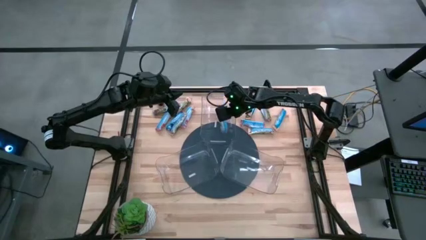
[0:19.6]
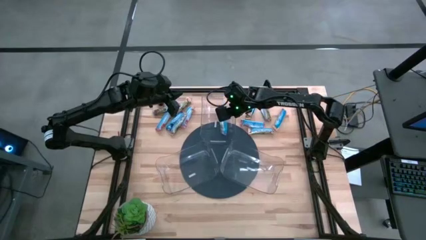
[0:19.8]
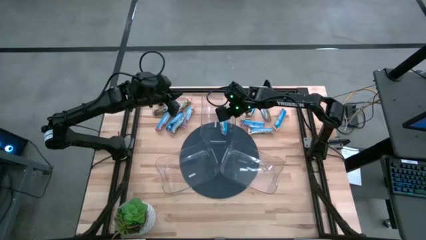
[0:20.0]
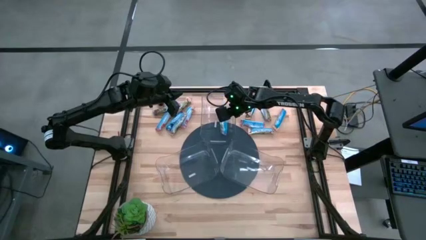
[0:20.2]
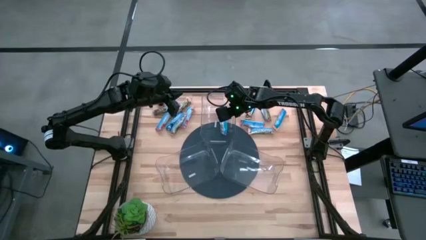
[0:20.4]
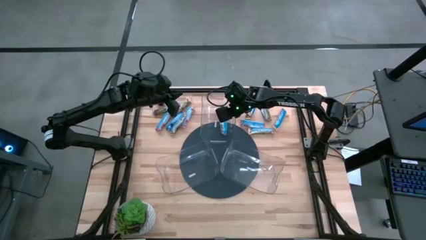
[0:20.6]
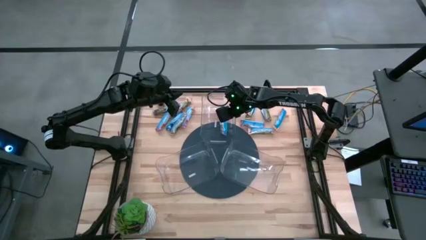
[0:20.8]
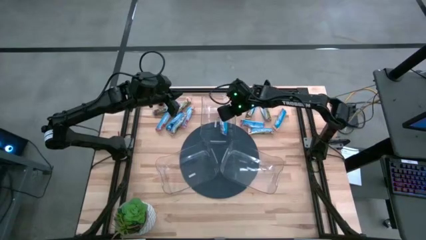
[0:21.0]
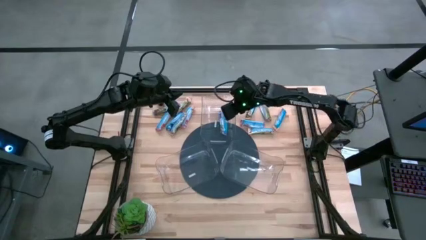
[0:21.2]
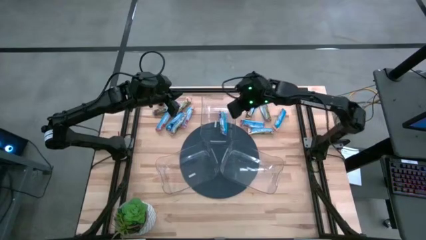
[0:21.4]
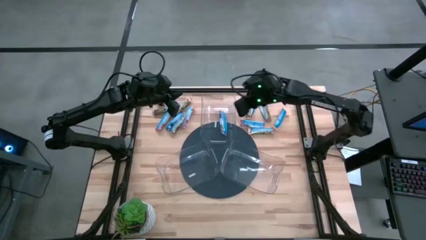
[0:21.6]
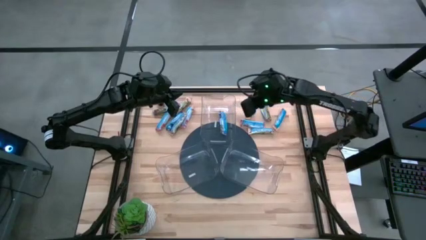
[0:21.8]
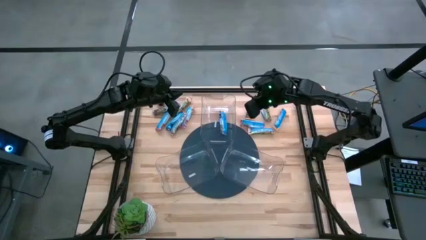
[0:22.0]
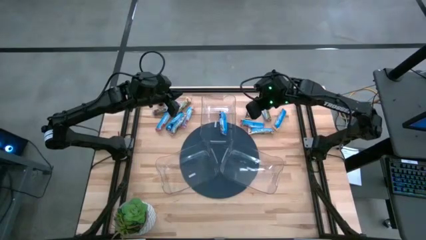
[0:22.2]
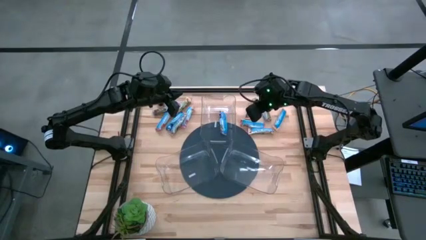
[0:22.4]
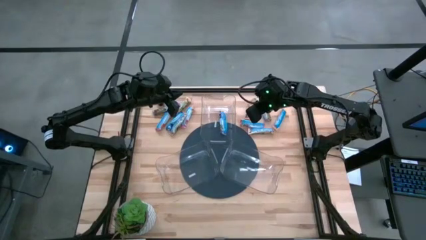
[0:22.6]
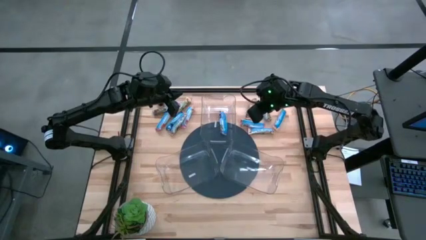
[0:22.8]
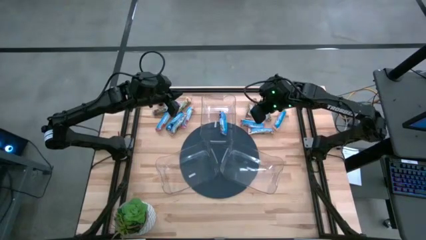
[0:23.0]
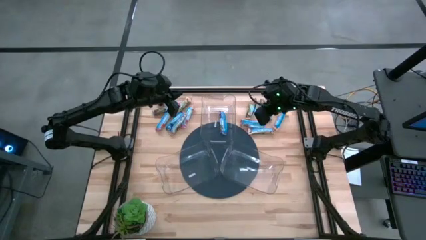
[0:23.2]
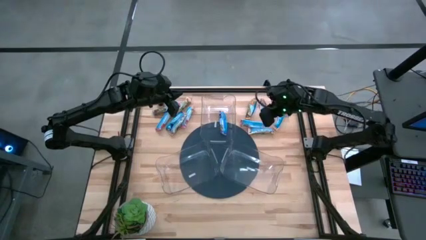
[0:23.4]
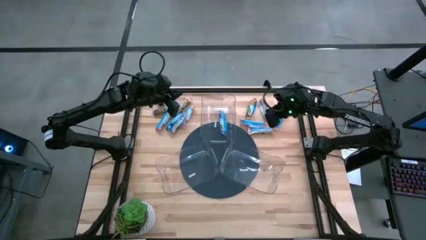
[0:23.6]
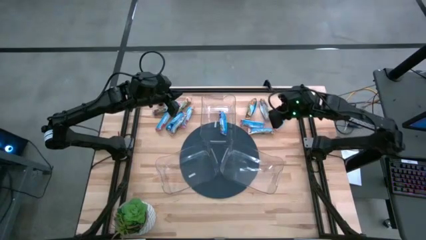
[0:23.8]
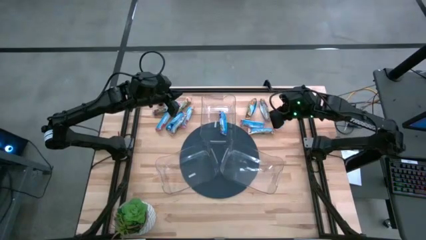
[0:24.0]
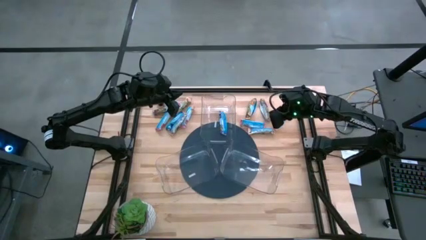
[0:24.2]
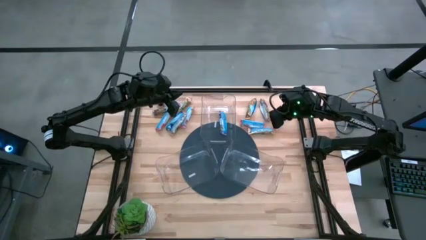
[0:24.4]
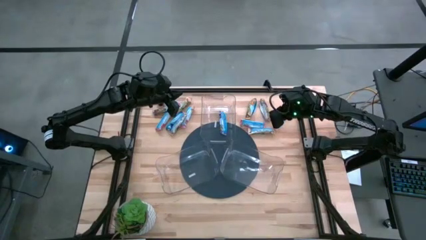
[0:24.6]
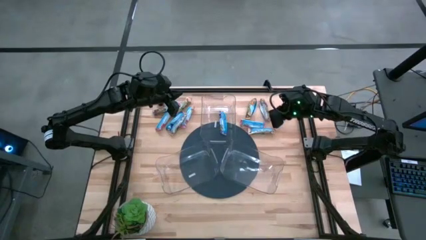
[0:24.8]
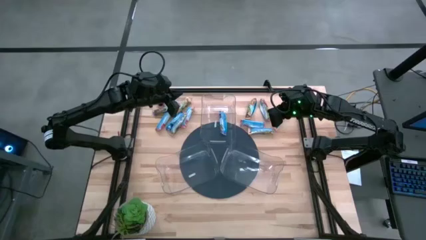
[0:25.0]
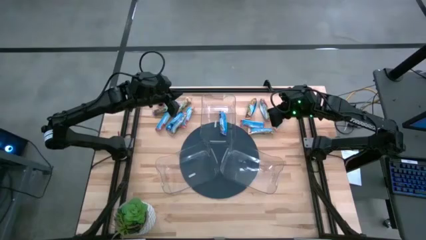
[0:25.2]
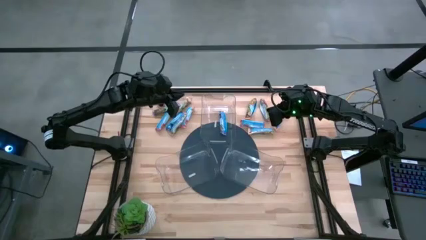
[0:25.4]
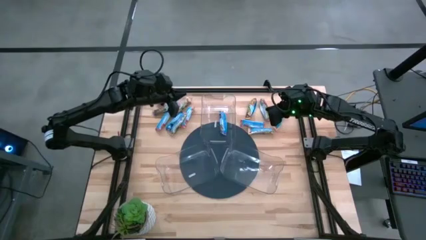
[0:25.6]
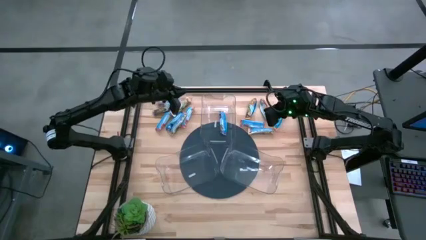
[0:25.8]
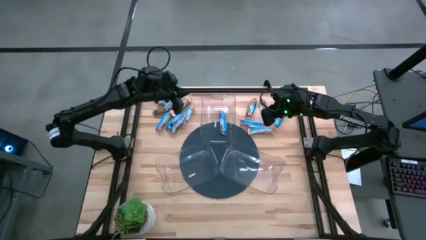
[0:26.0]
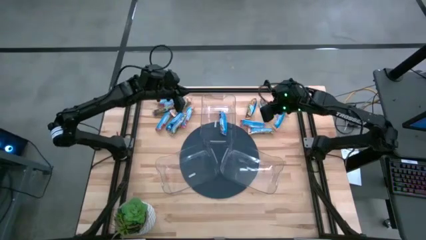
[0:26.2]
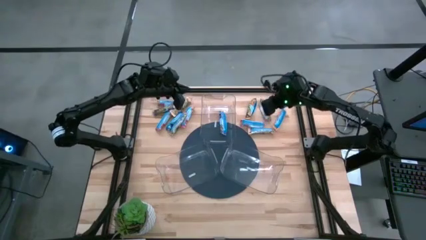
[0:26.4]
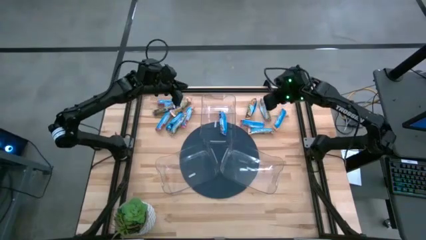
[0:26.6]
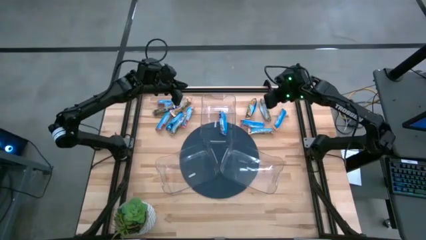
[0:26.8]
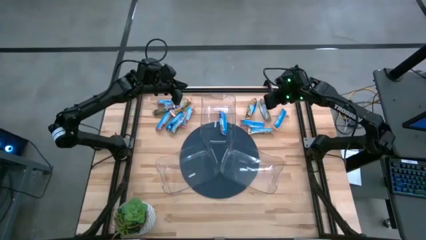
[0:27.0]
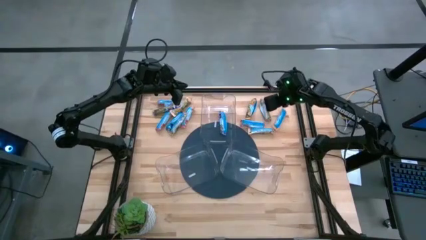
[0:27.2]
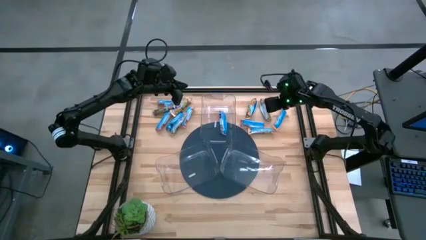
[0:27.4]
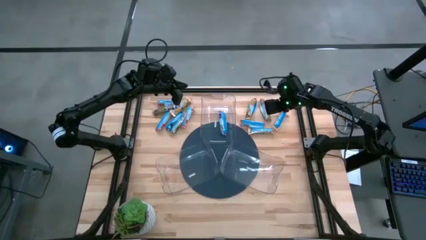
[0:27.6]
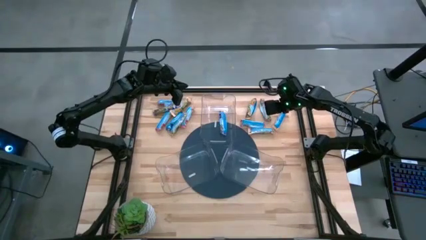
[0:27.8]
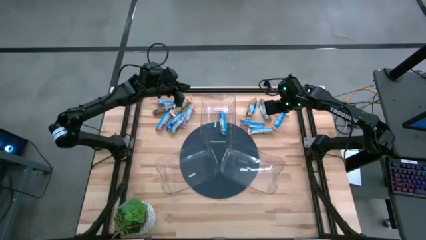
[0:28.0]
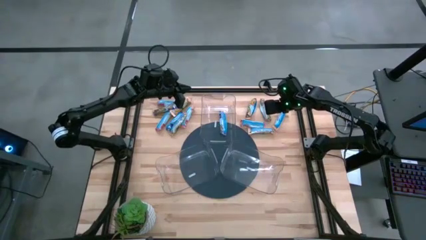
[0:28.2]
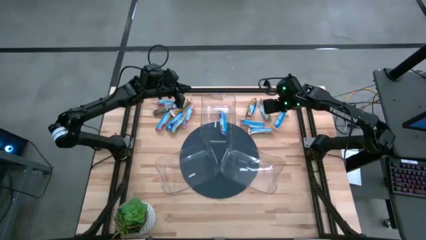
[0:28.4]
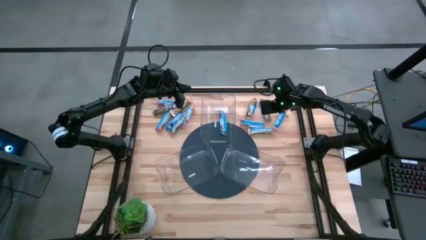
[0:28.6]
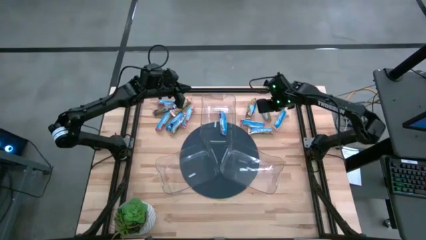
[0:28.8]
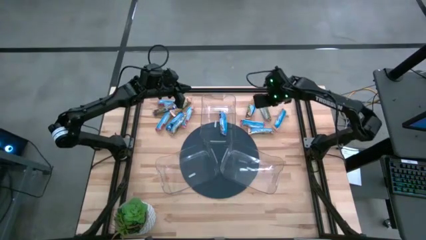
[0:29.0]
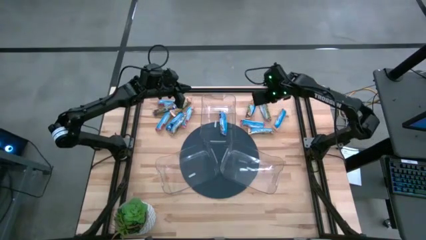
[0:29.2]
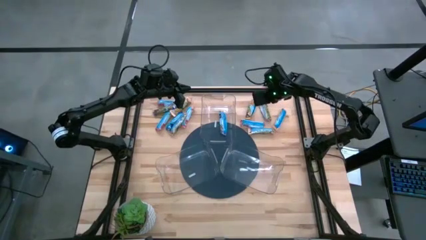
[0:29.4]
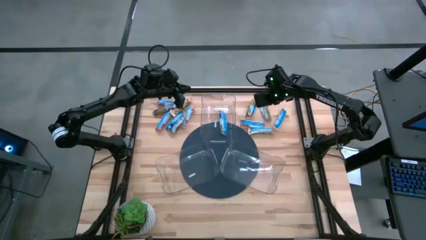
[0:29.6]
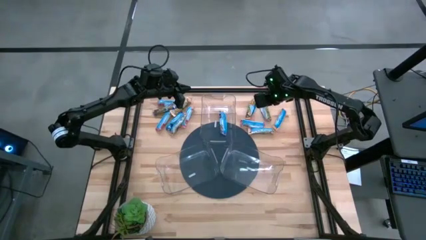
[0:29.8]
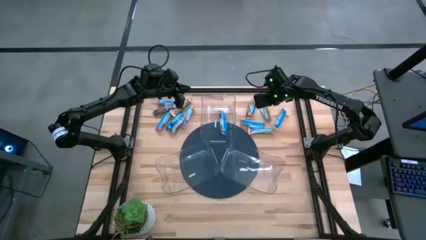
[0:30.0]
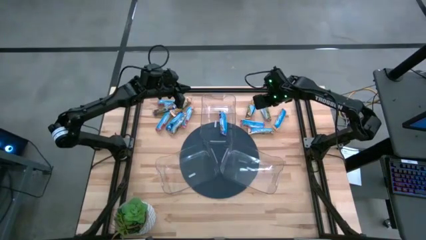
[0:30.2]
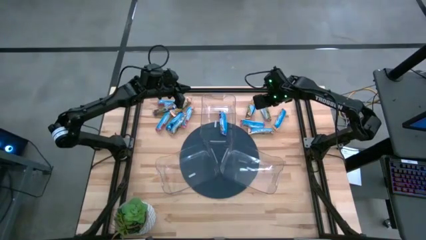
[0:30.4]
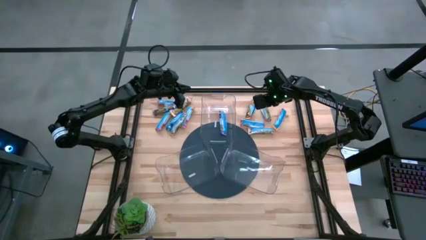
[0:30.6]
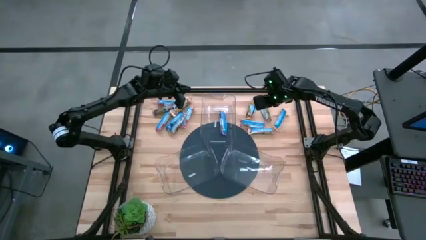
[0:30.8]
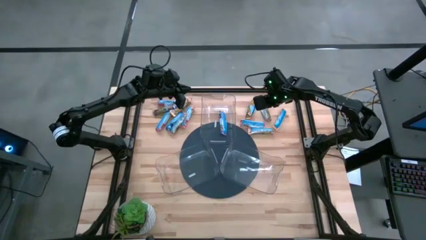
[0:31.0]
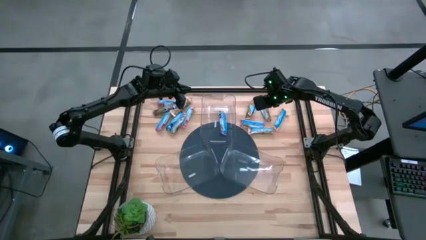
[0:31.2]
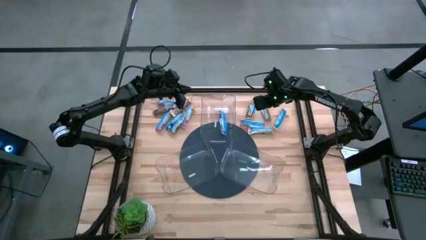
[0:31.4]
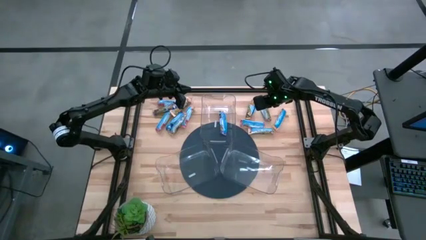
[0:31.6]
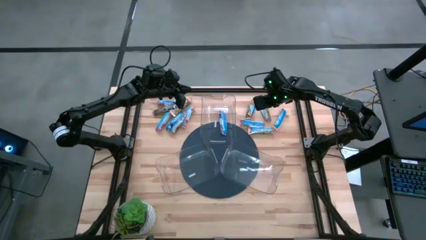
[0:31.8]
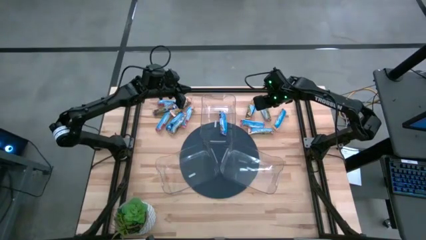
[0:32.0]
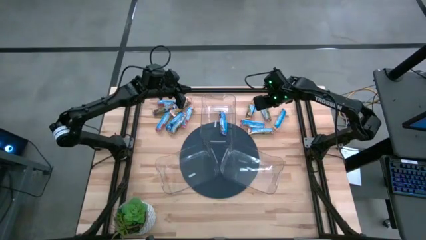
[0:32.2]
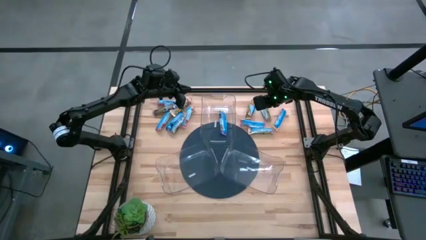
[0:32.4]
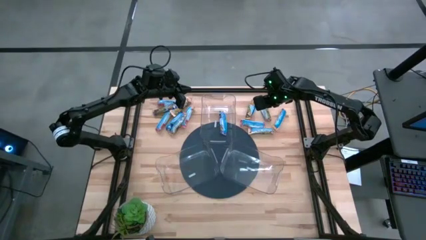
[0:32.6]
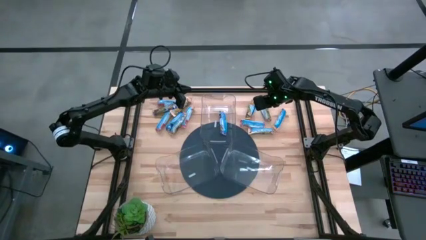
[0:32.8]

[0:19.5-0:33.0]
Task: Pick and place Granola Bars by type
Put the yellow granola bar into the right transparent bin

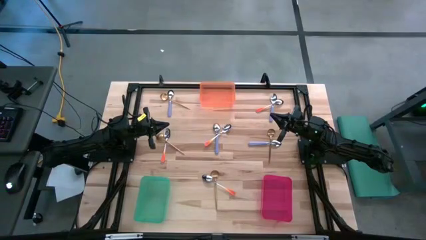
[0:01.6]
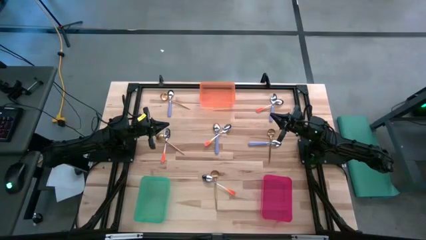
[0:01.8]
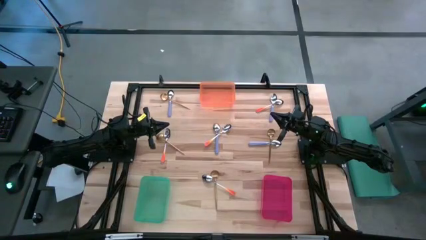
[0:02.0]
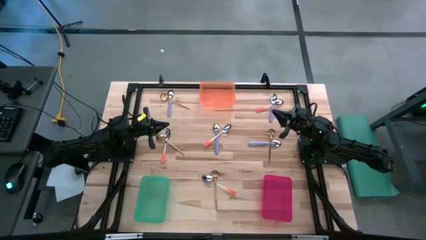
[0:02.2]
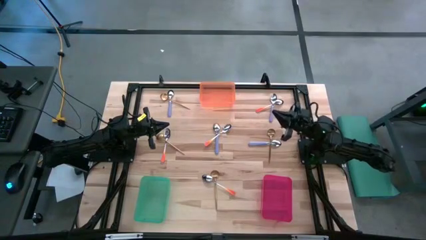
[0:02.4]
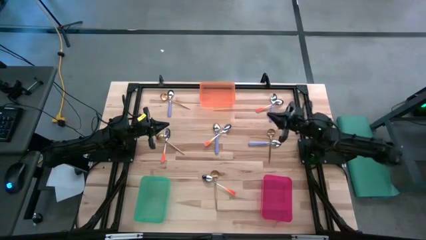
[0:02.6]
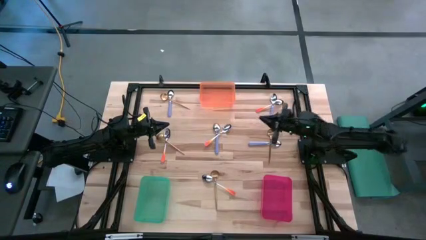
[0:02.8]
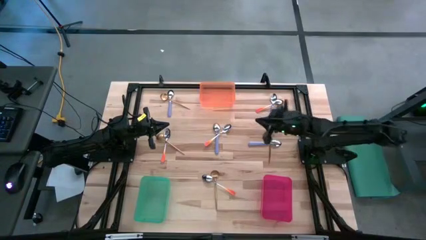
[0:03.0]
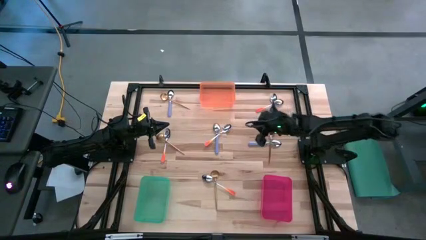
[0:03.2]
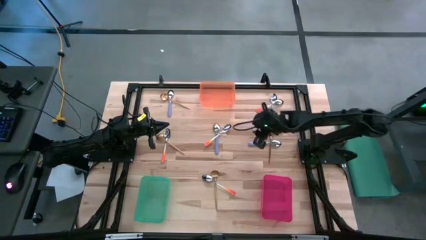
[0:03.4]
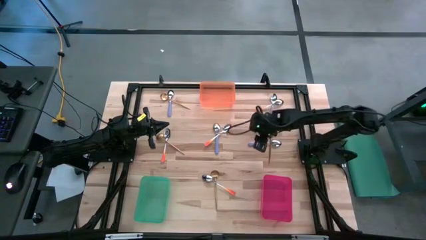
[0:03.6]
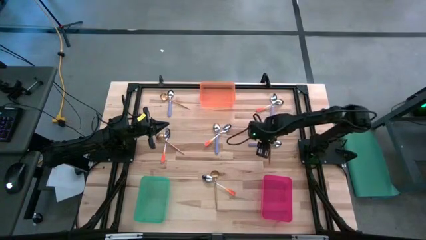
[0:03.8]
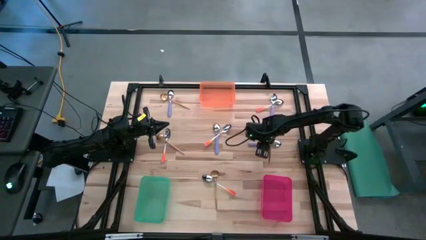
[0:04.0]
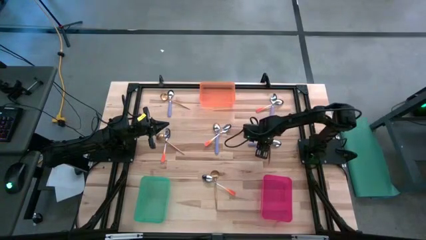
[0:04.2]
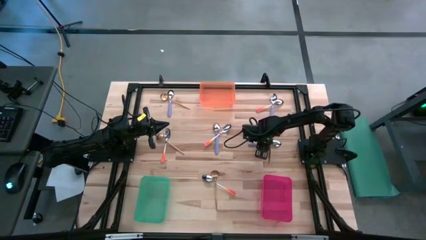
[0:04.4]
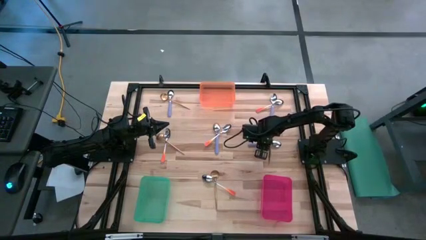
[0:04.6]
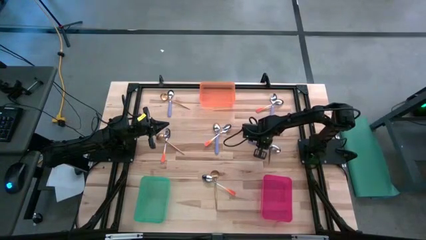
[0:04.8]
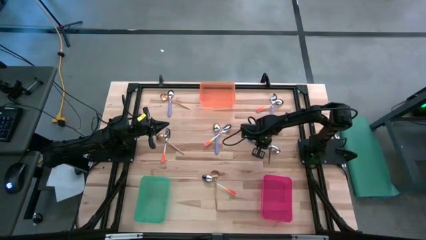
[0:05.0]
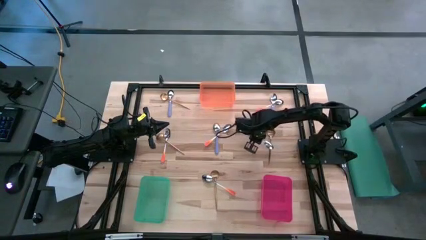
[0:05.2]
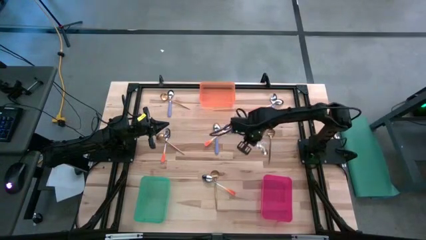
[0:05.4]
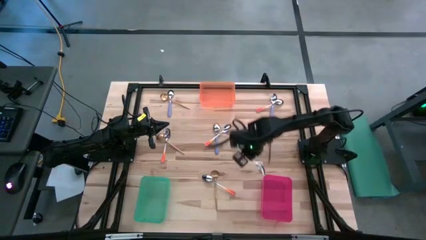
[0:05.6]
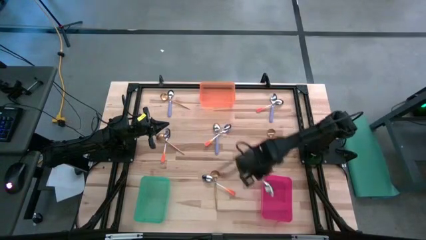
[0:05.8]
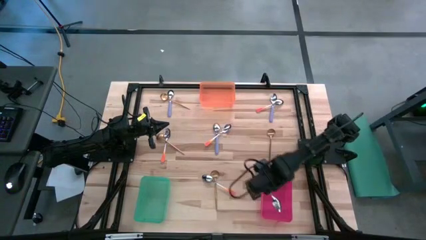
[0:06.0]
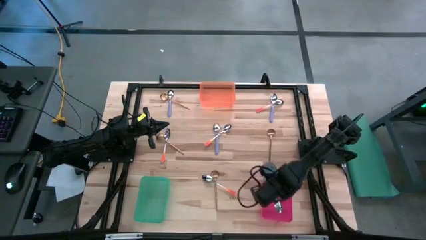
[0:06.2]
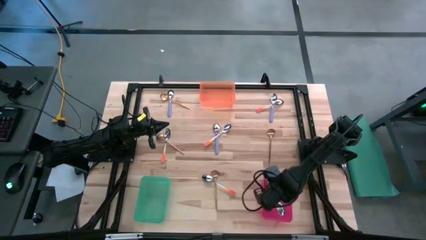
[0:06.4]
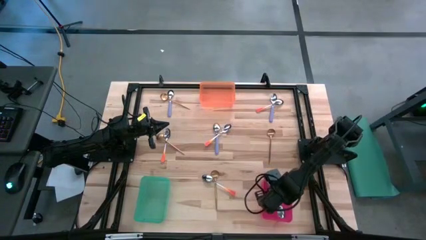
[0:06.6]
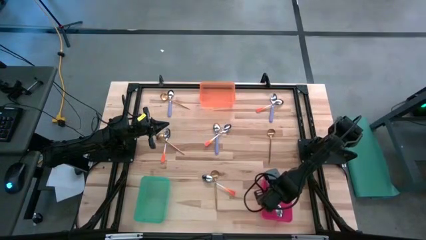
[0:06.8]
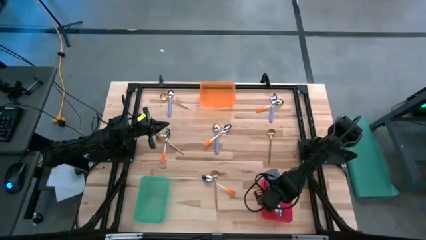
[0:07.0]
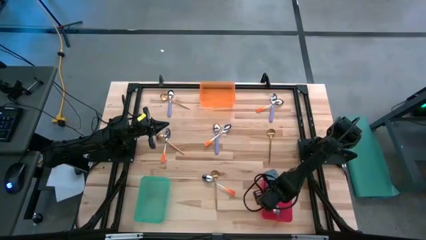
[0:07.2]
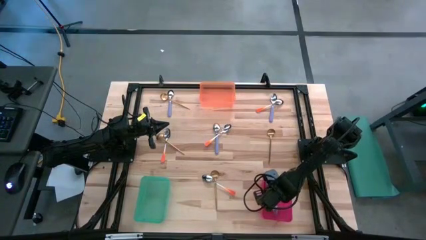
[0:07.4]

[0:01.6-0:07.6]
Task: Sort silverware by color (type)
Put the violet spoon into the red bin
